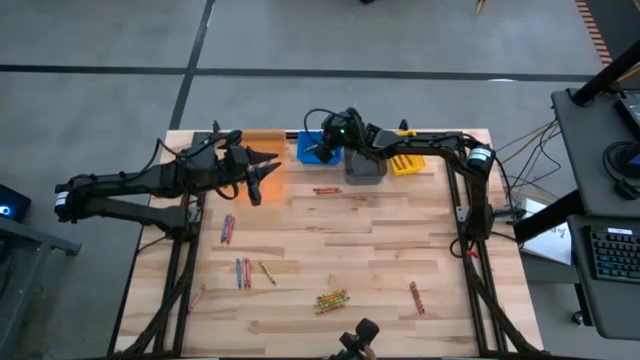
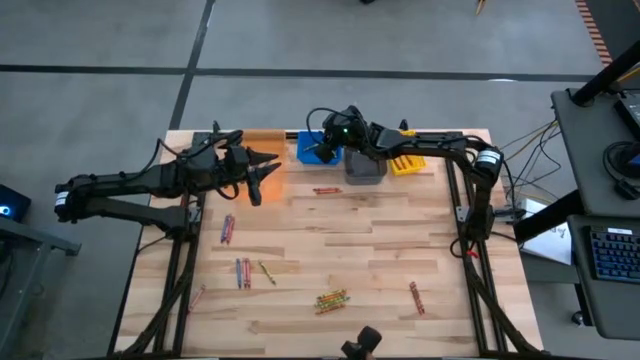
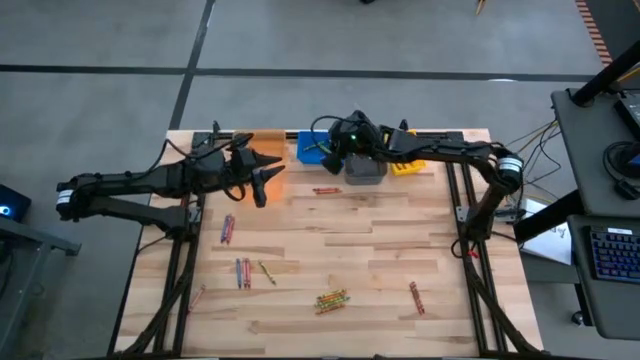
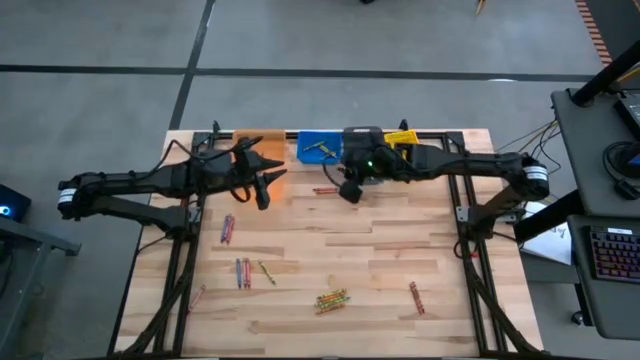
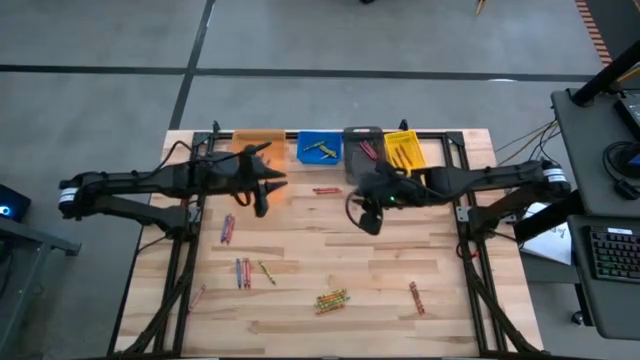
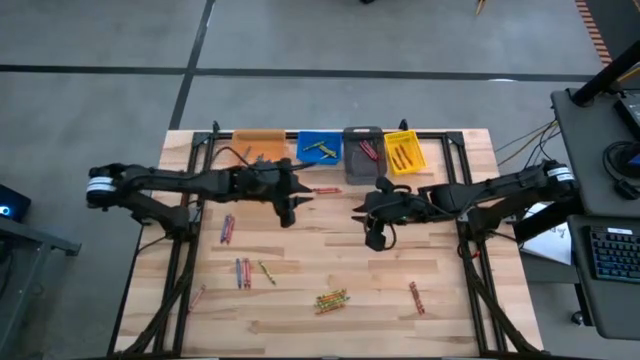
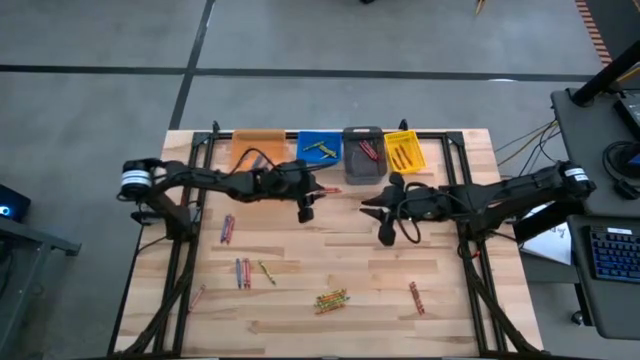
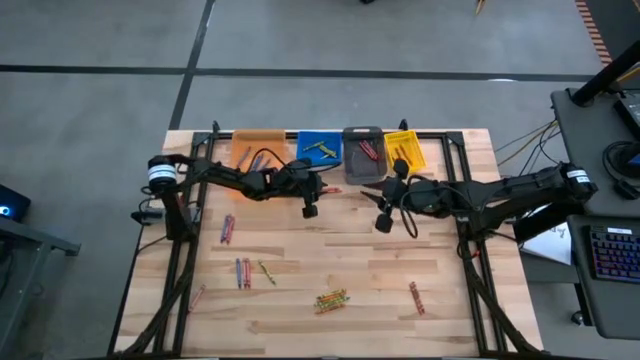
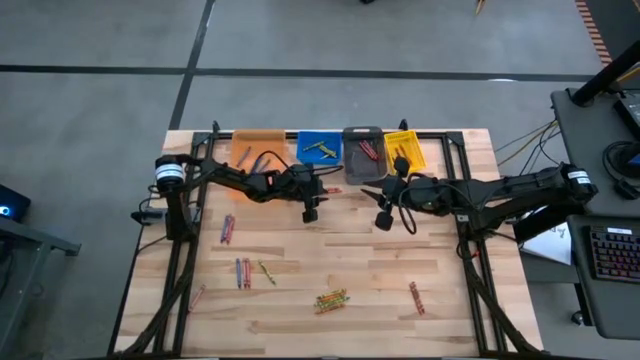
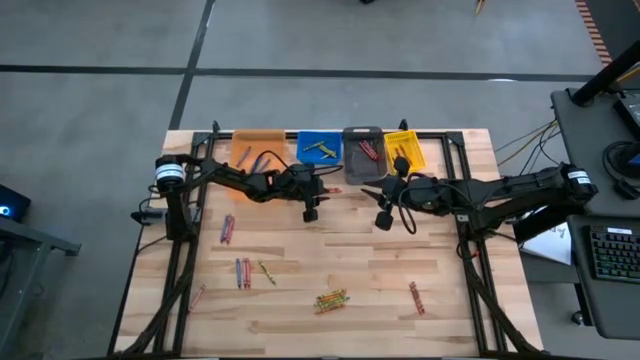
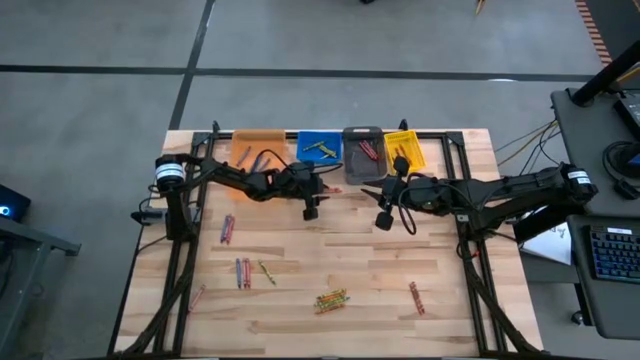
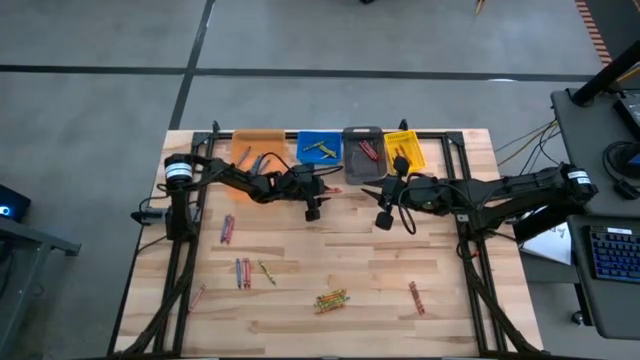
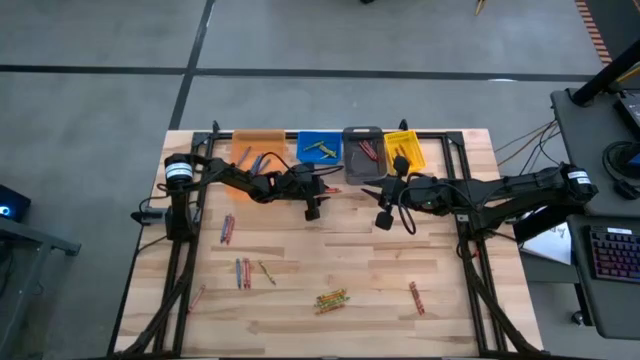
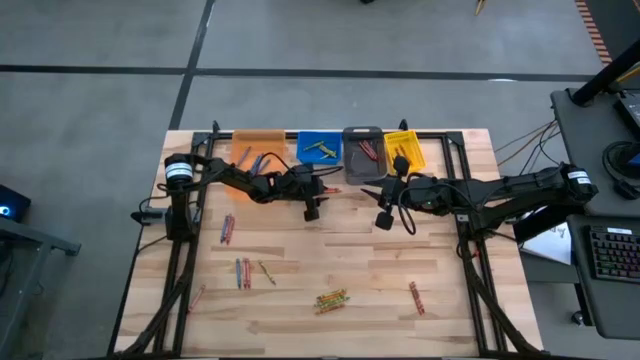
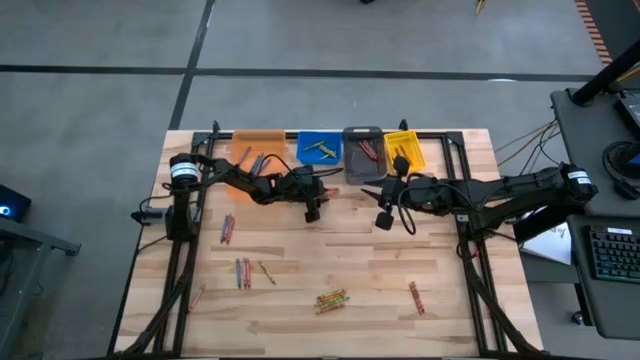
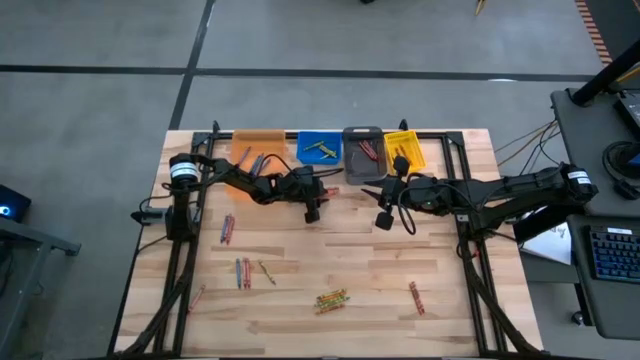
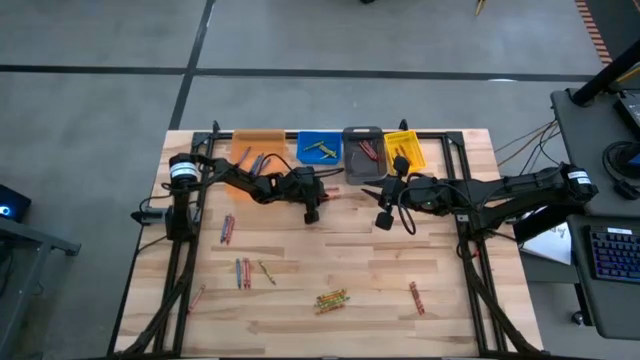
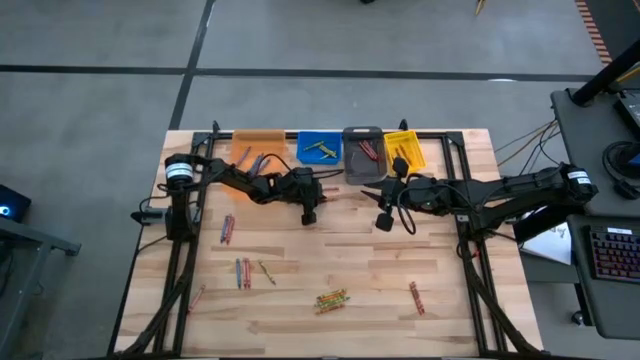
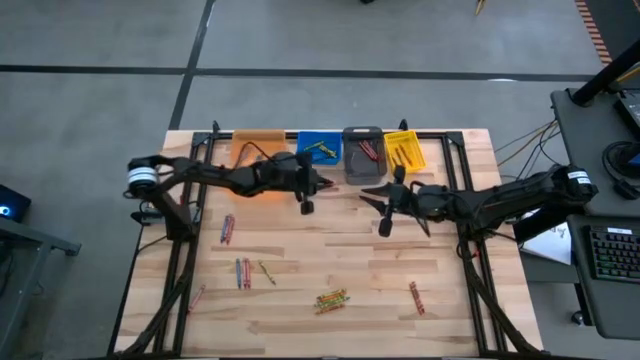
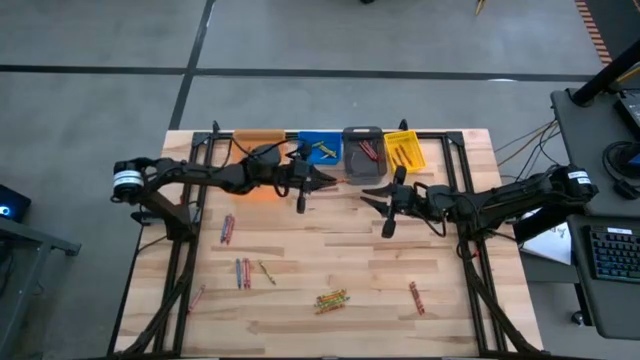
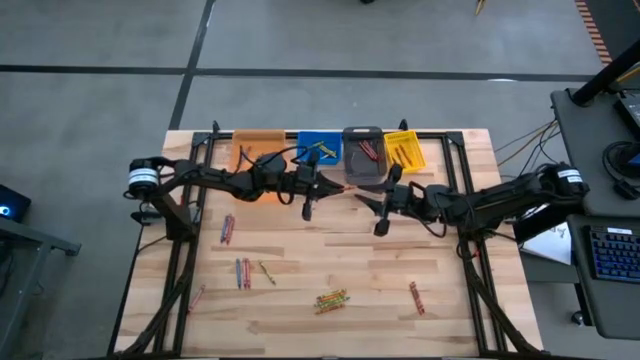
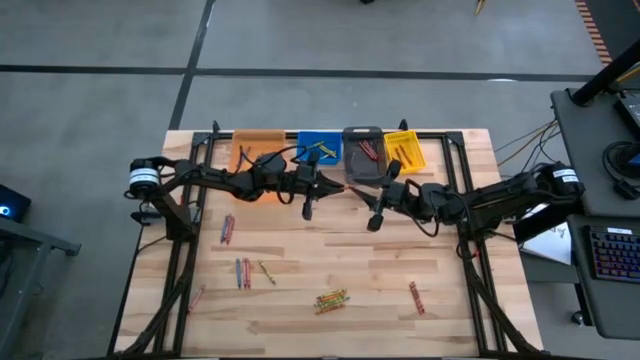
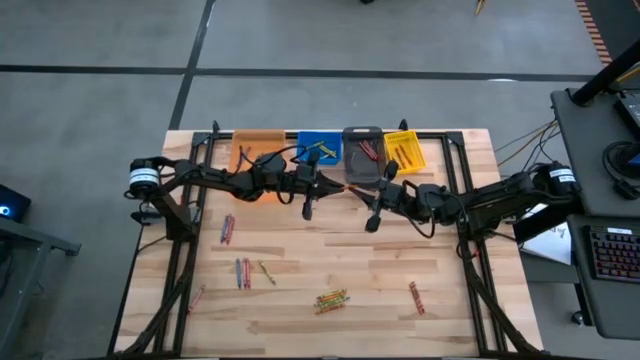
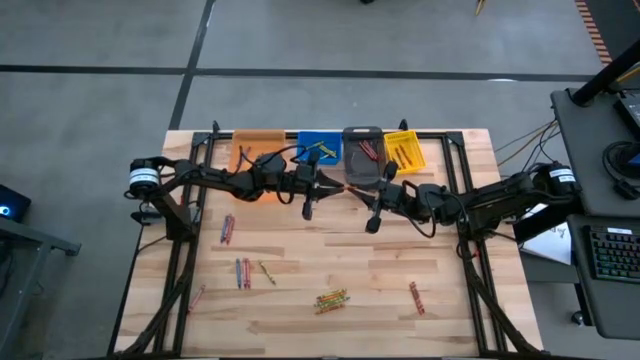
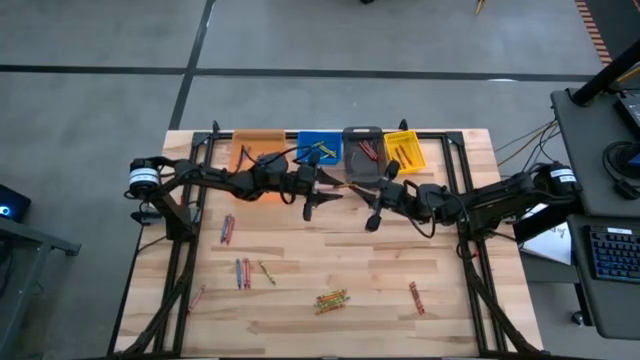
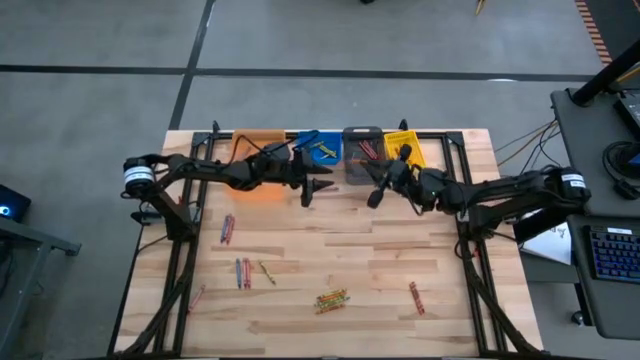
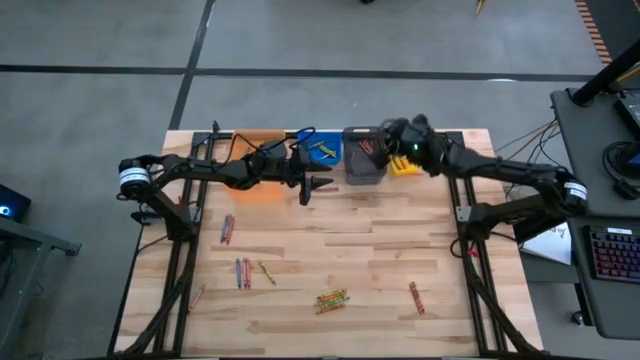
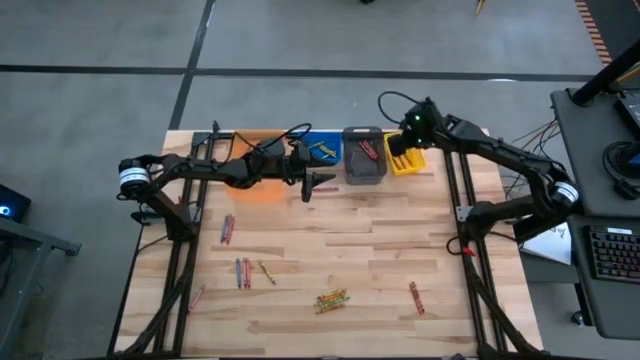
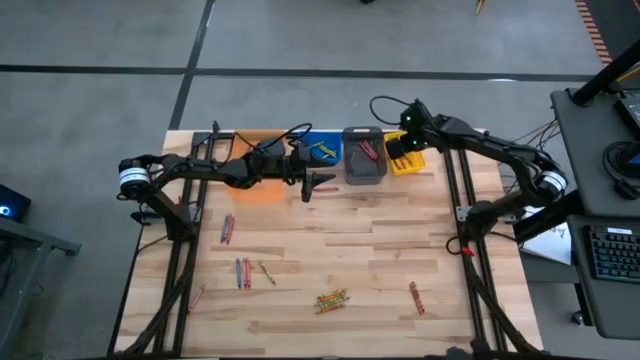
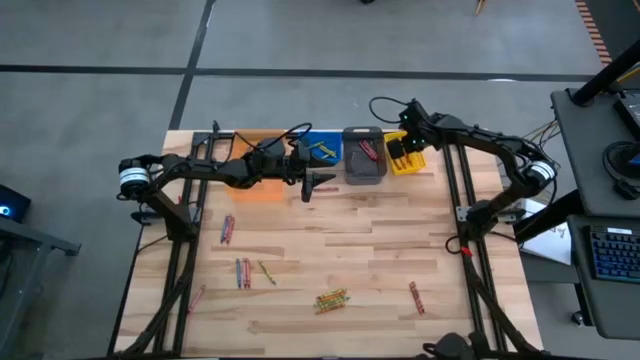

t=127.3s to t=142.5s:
Task: Sort crayons
Put the orange crayon into the yellow bin

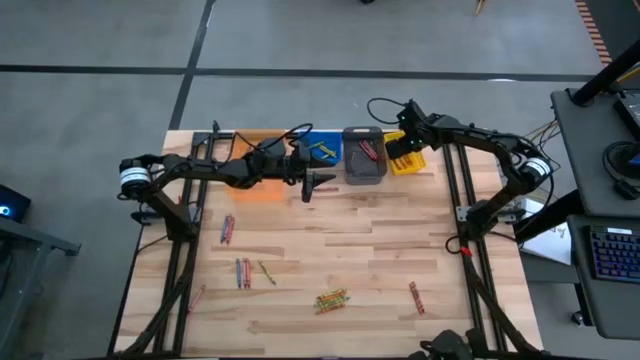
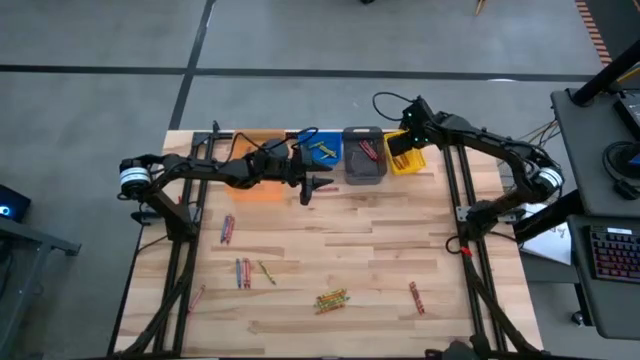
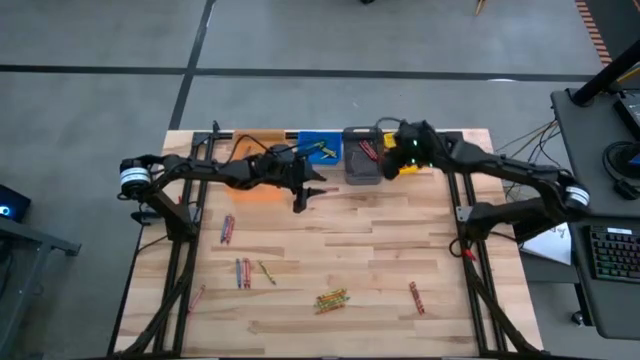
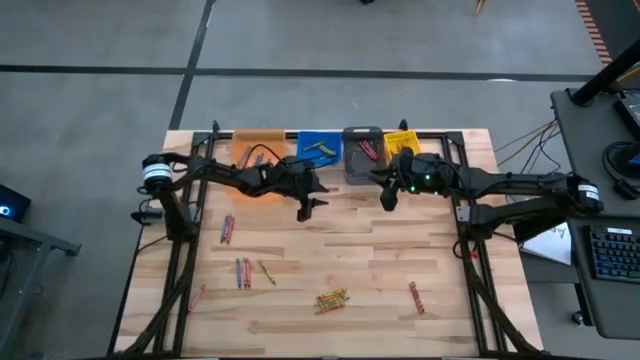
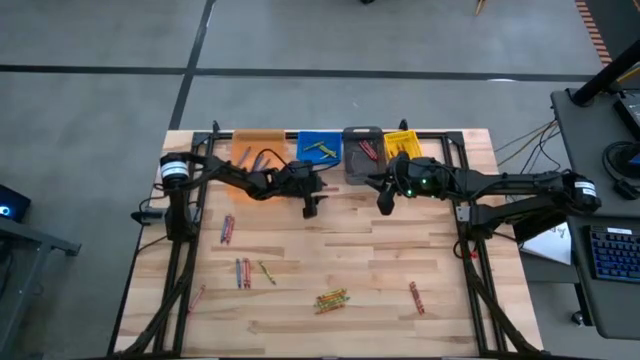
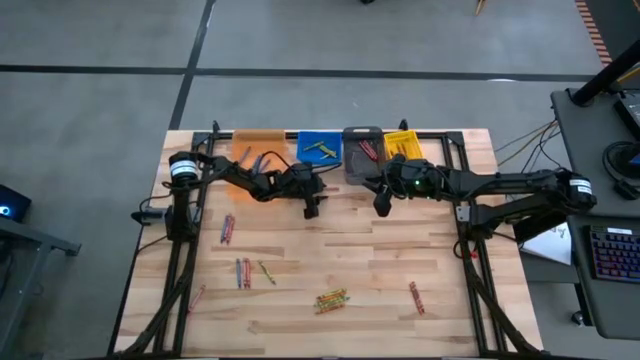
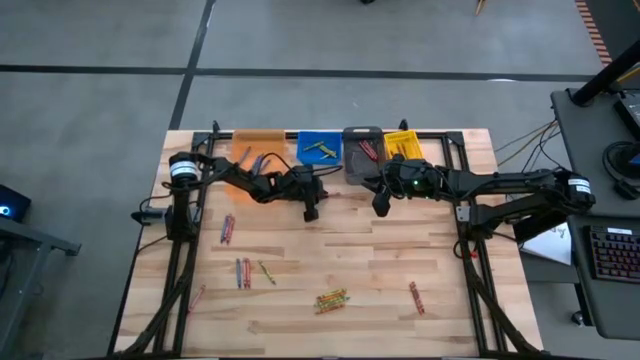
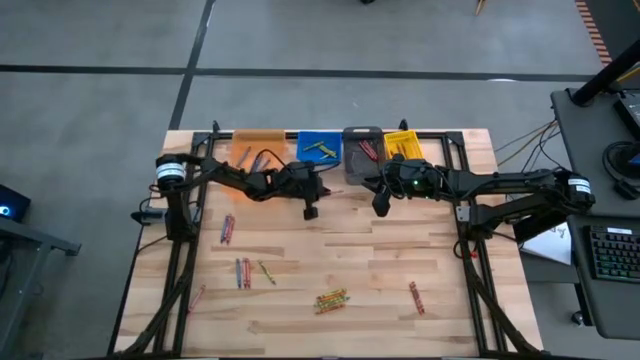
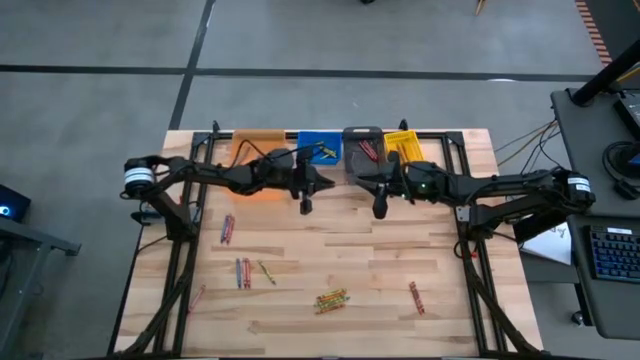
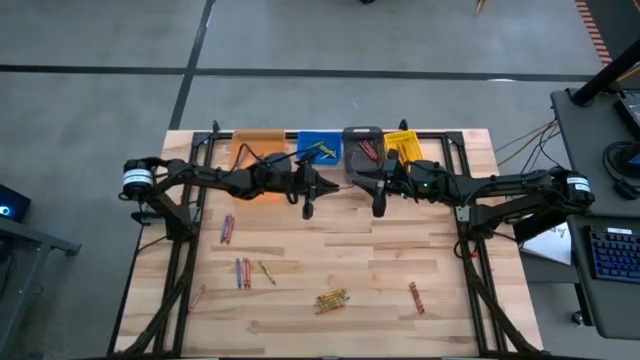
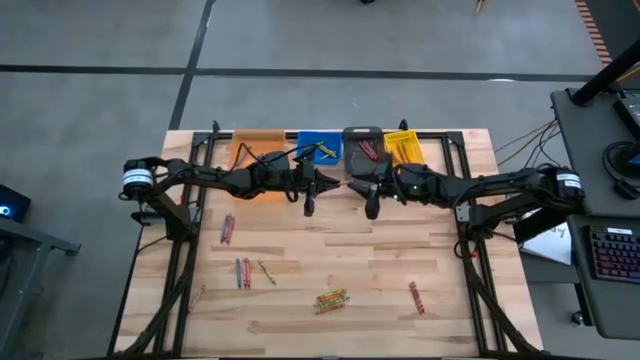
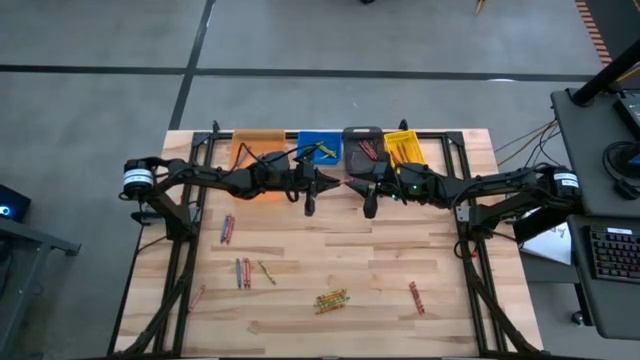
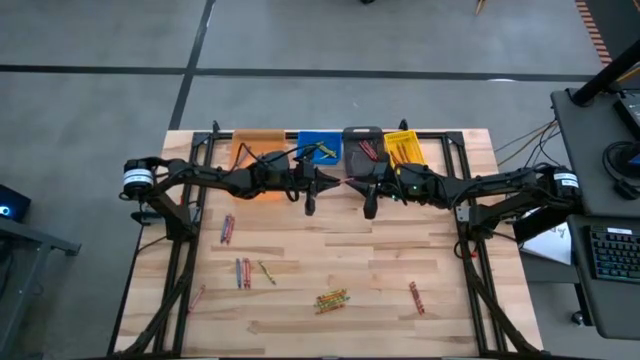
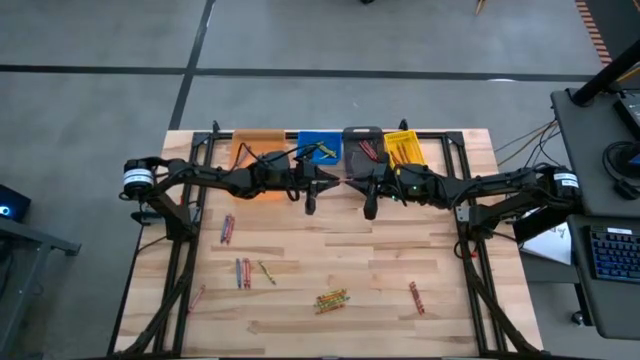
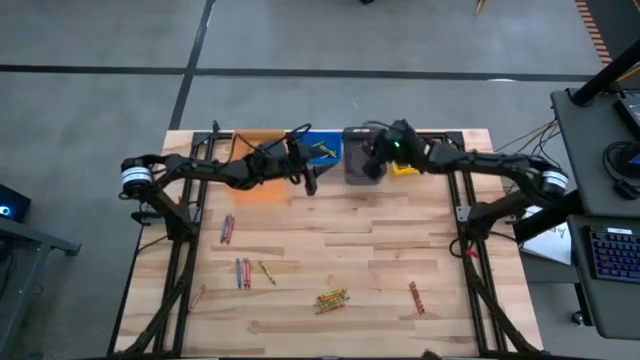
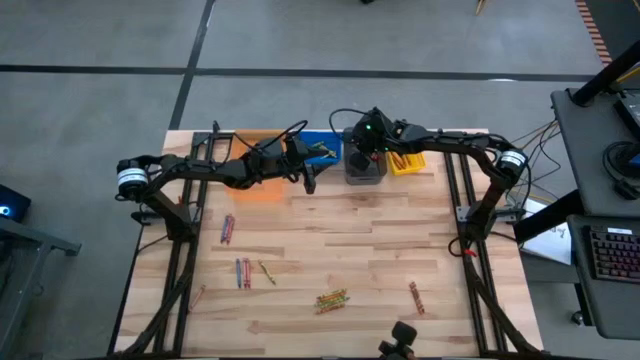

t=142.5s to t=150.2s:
Put the red crayon into the black bin
